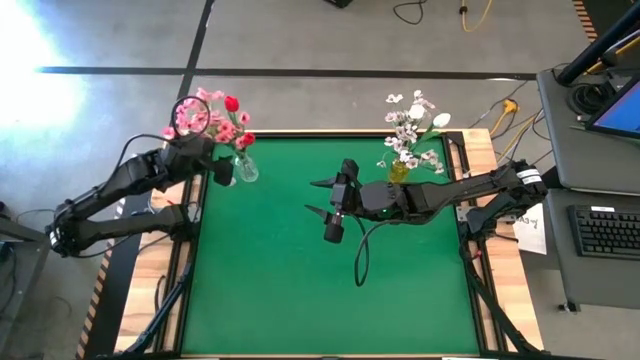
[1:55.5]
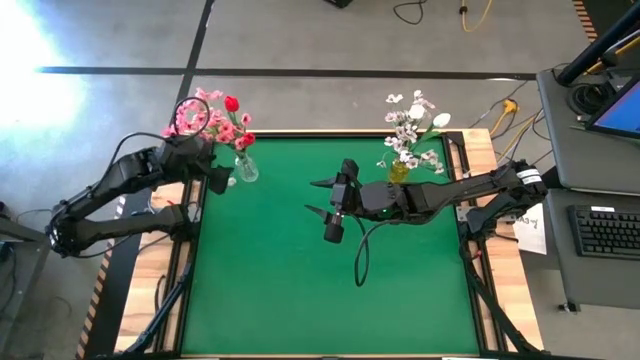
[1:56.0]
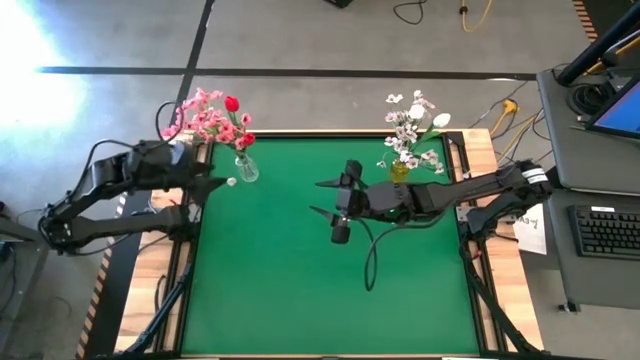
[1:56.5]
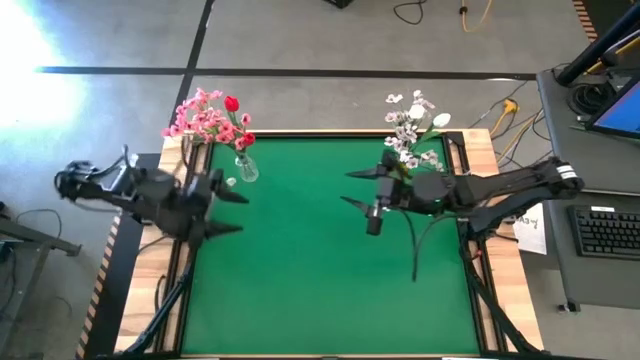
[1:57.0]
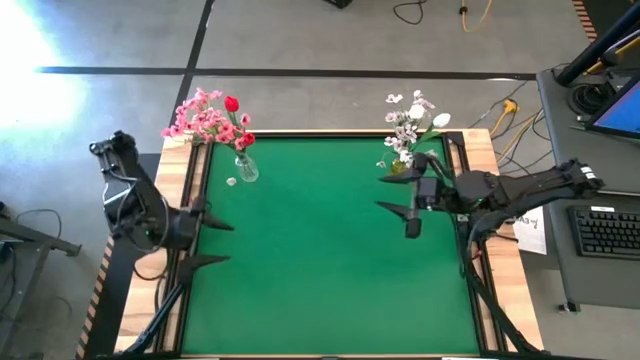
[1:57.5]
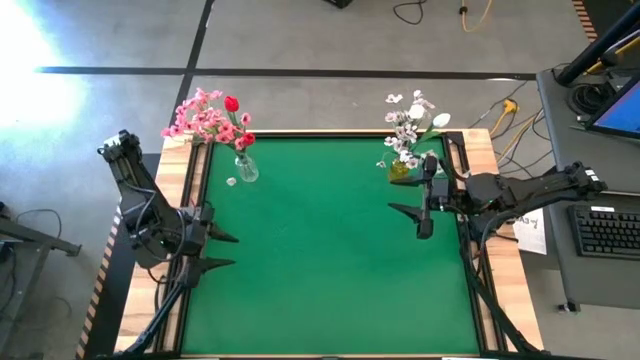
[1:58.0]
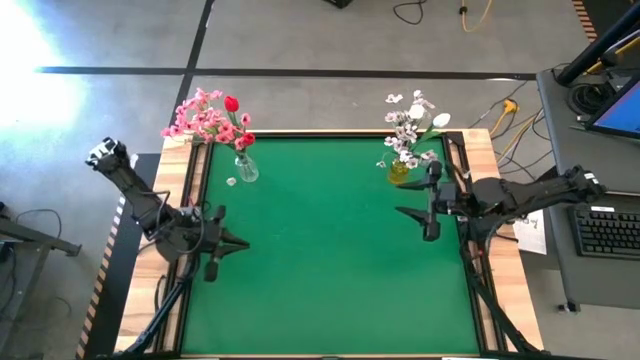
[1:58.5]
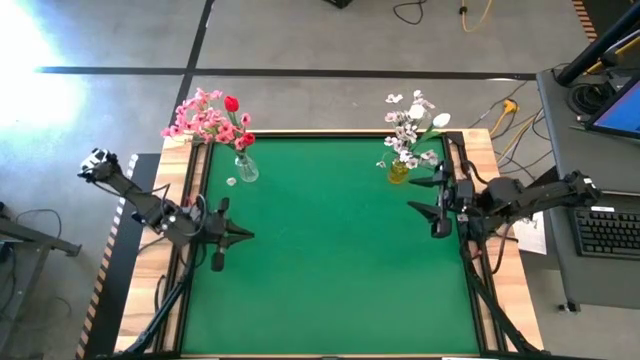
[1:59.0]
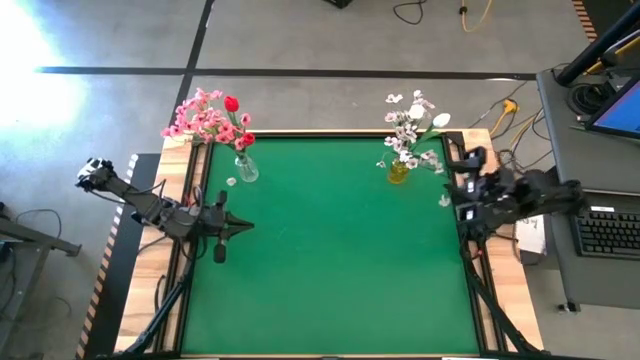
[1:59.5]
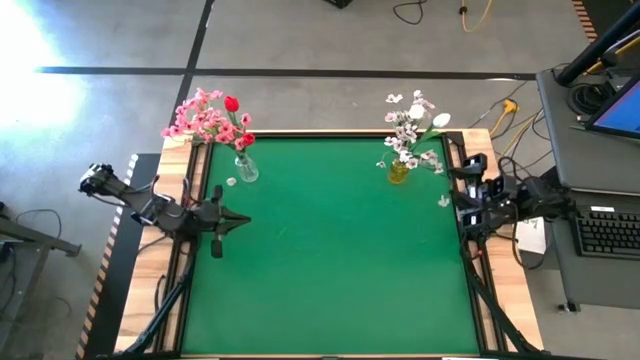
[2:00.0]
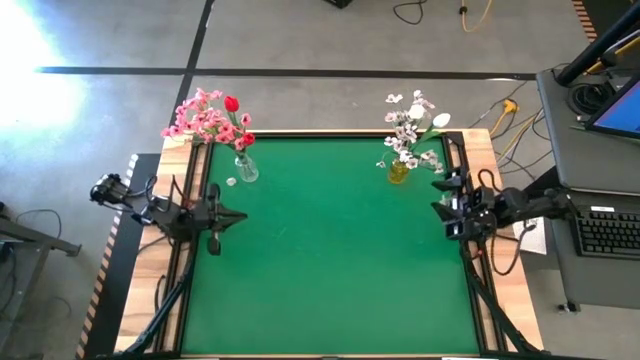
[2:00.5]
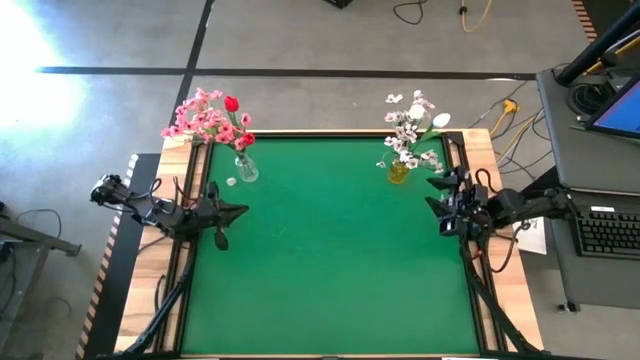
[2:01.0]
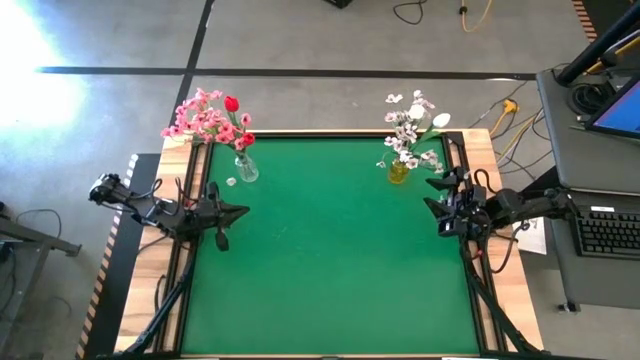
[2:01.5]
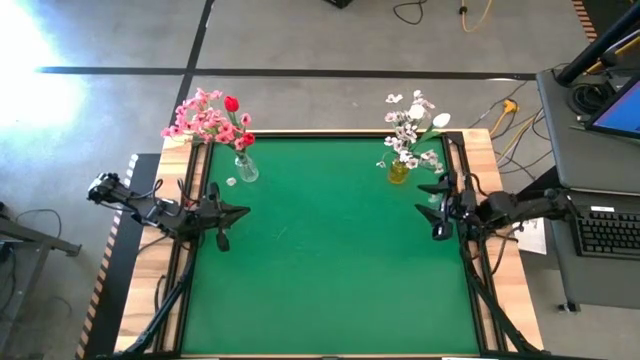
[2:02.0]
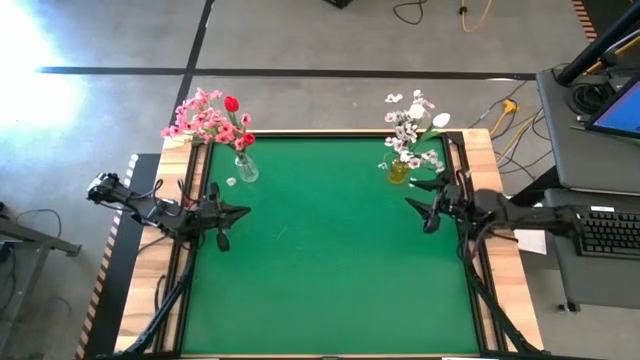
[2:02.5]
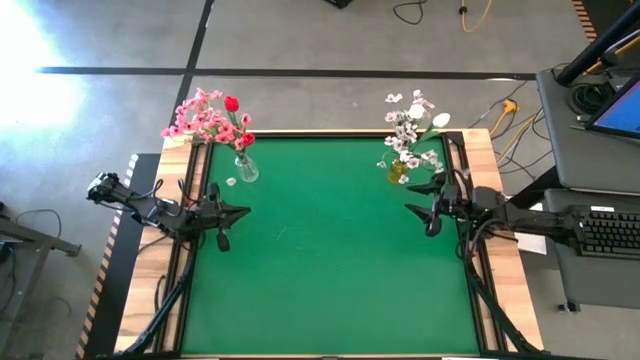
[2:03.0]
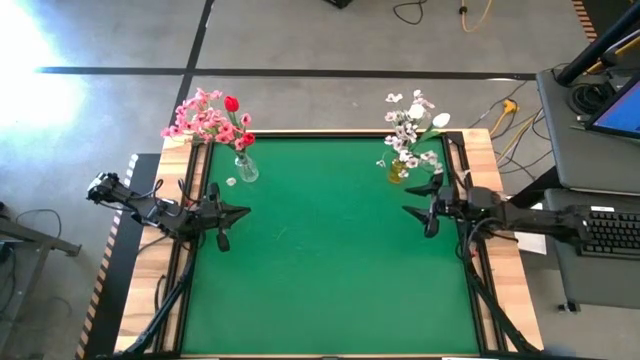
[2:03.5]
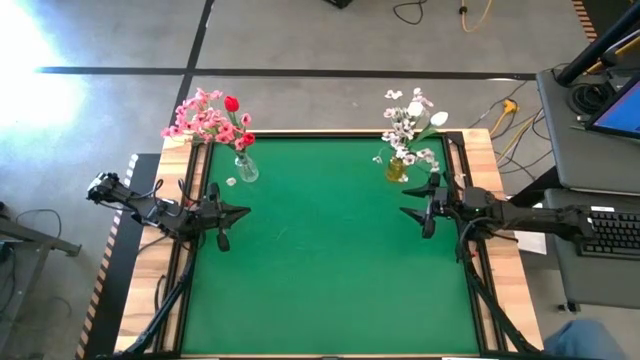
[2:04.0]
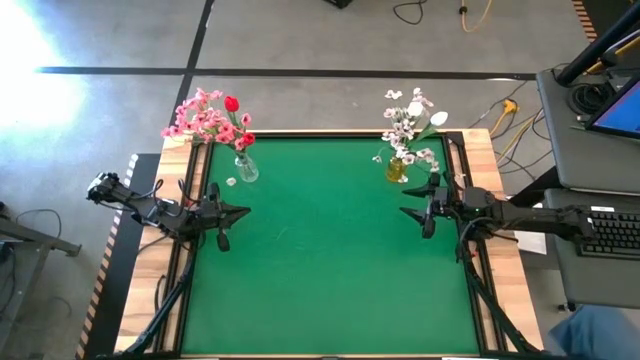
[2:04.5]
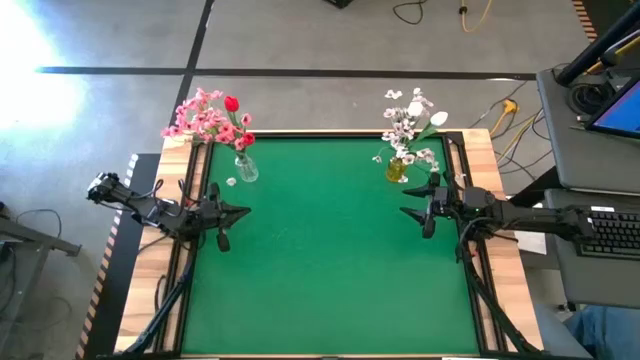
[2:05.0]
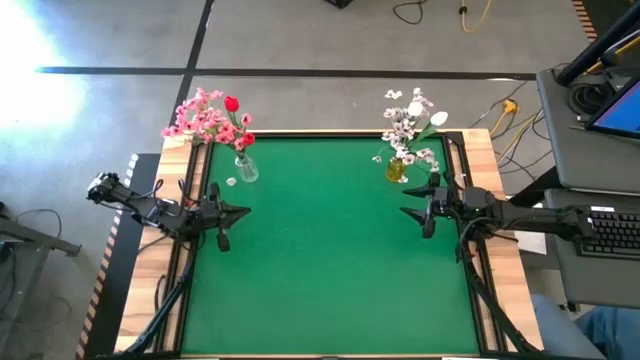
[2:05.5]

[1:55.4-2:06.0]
Task: Sort flowers into vase by color
Return to Home Position

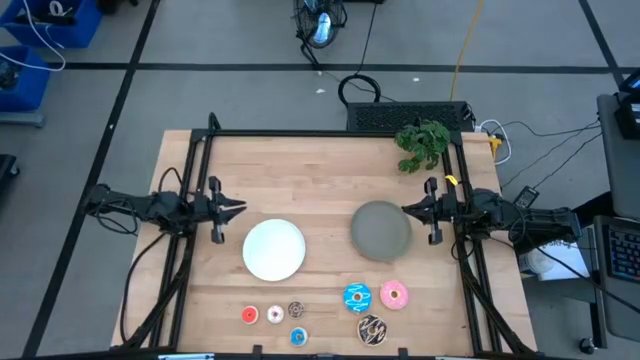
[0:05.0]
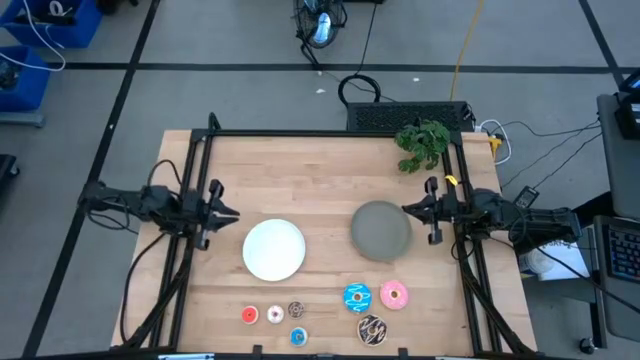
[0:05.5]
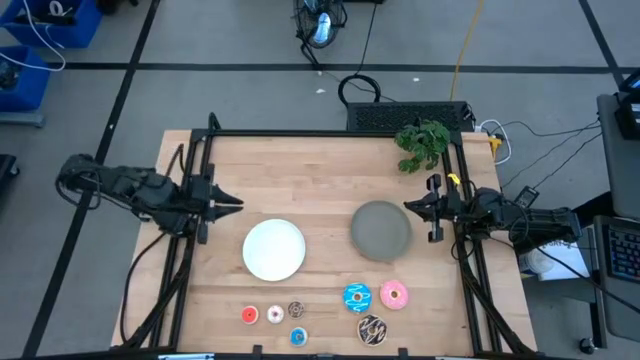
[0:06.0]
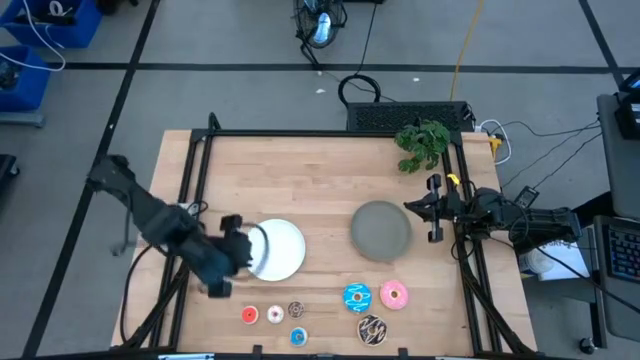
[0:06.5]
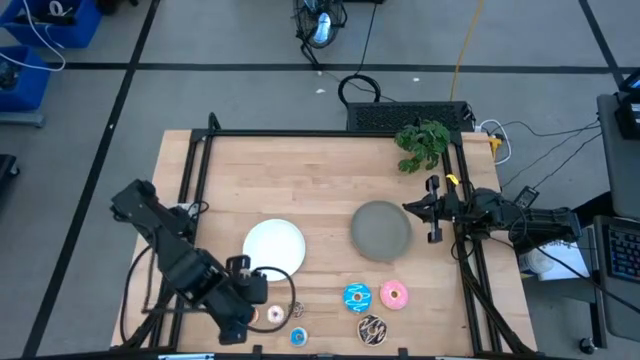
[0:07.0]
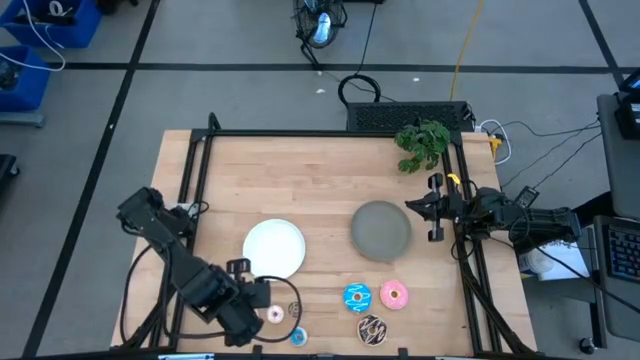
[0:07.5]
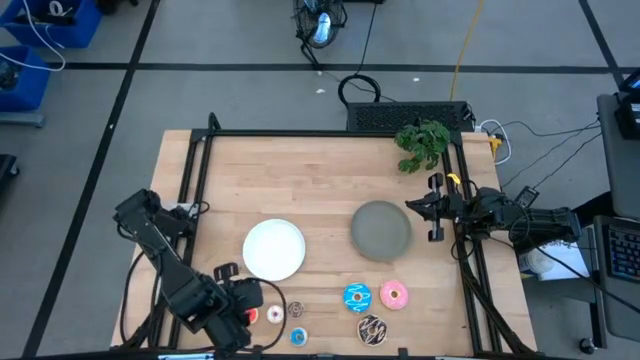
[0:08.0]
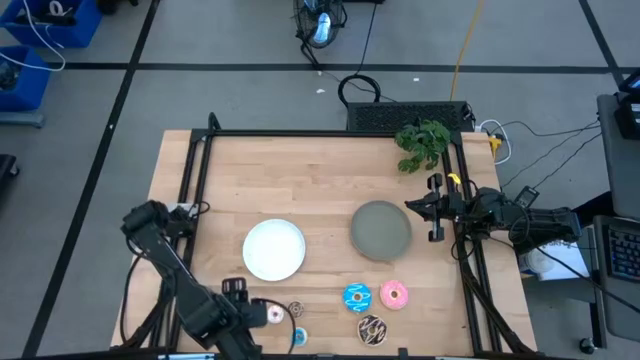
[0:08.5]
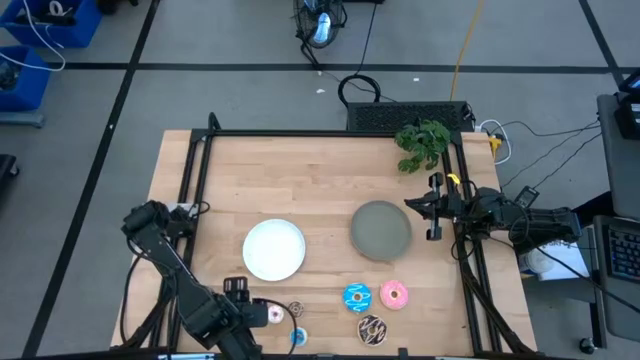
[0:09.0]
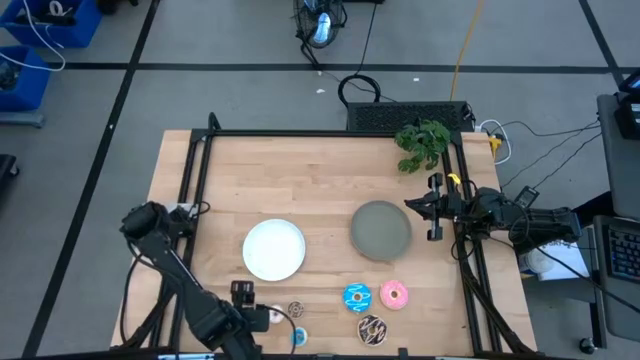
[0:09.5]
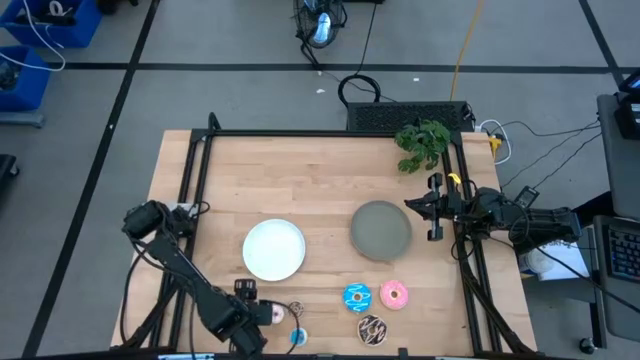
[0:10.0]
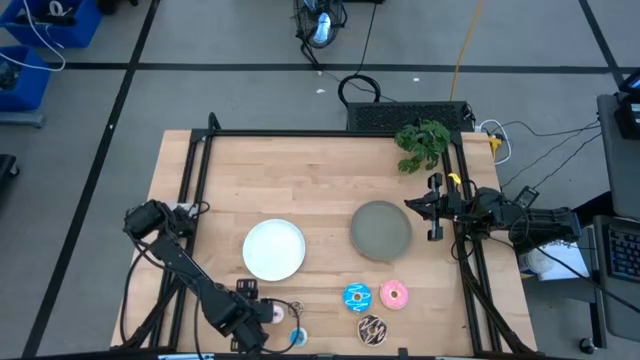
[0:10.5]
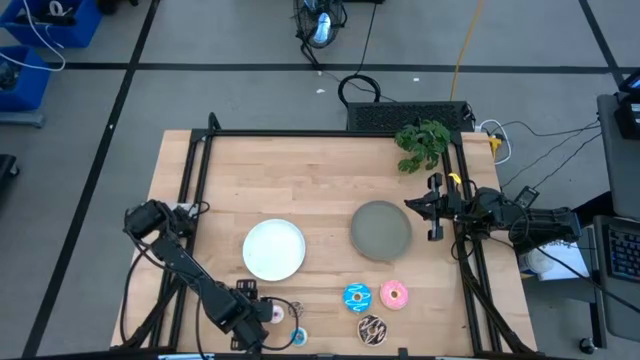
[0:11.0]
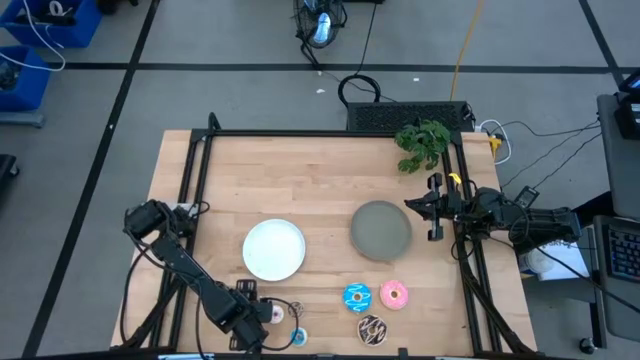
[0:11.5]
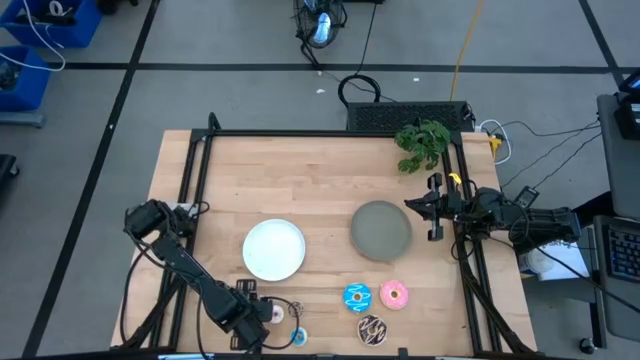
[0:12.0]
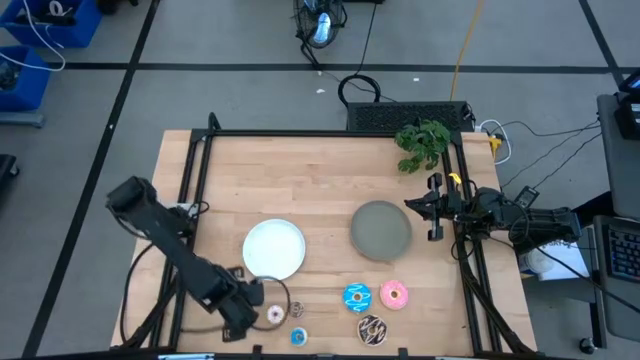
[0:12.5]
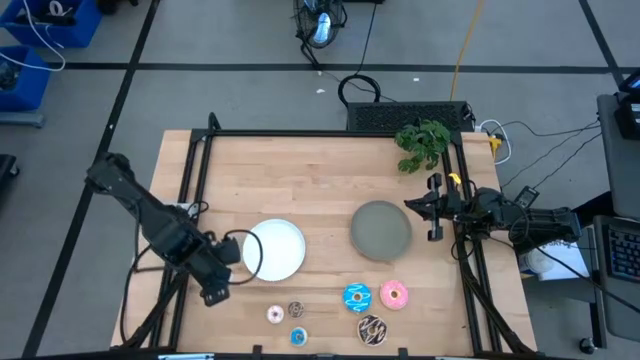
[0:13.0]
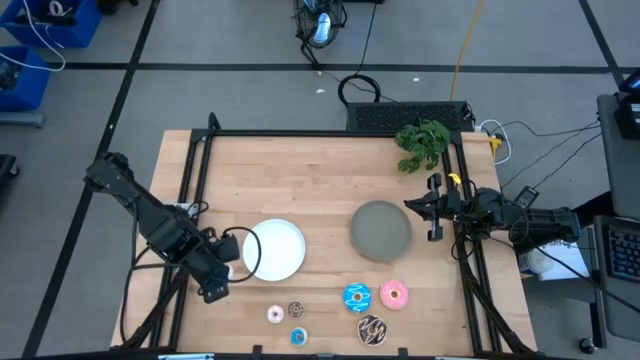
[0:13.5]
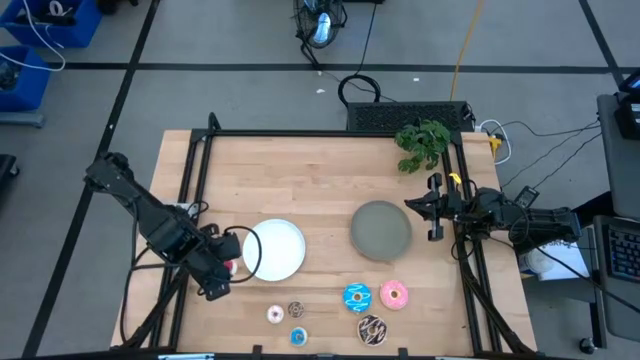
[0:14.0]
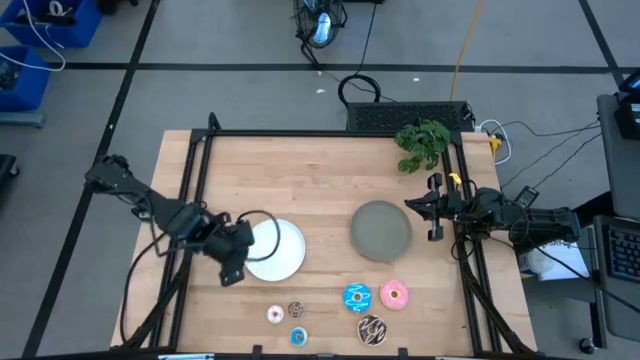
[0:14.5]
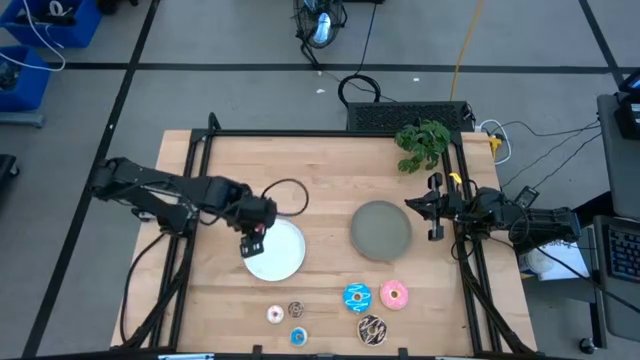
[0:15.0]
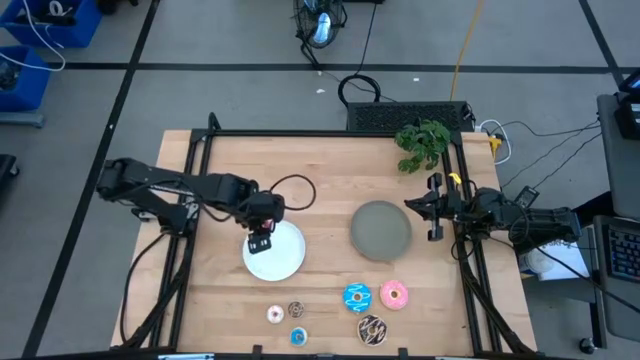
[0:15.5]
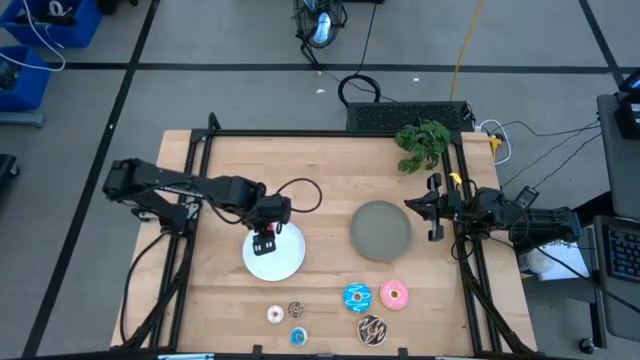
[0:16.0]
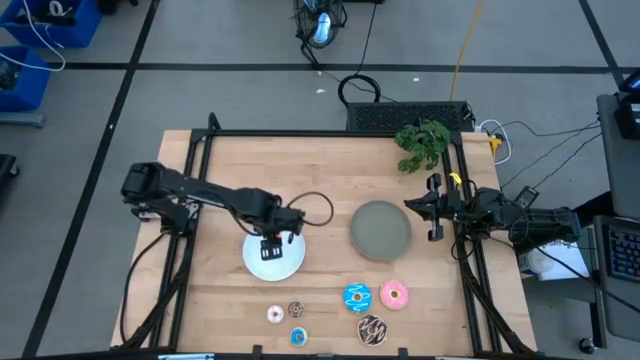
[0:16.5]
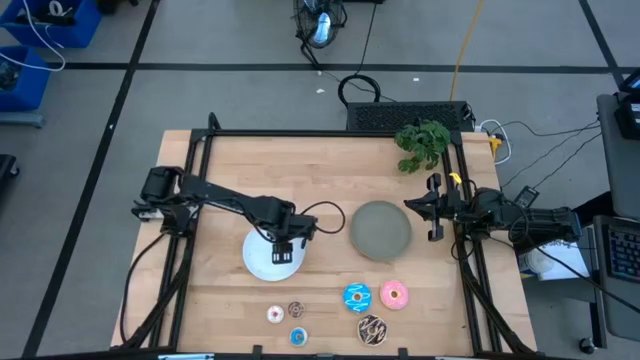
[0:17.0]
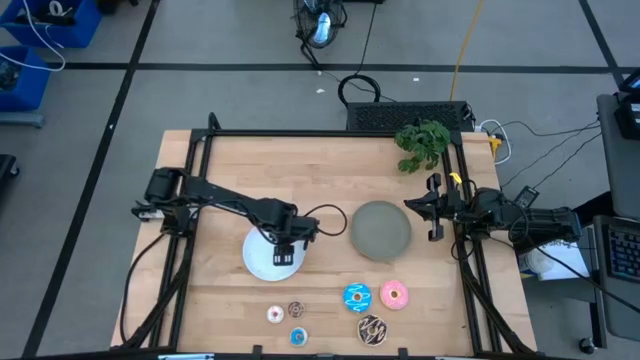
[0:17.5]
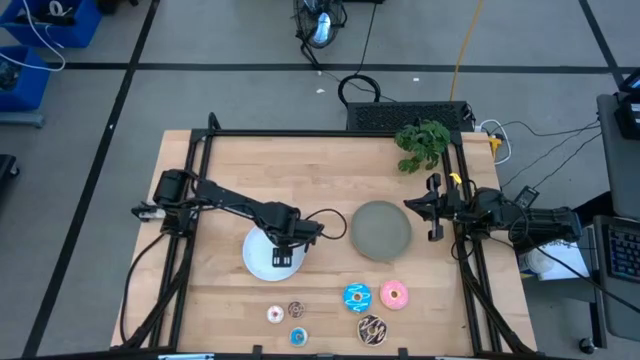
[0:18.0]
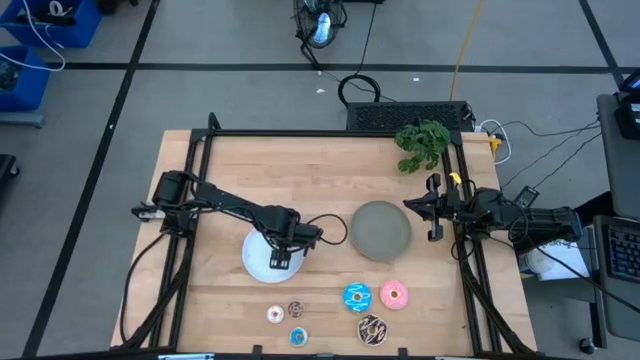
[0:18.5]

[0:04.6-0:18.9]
Task: Pick & Place donuts
Put the small orange donut on the white plate
